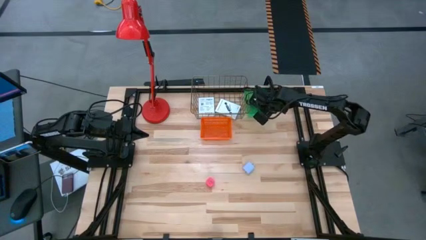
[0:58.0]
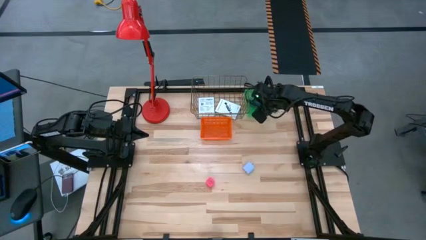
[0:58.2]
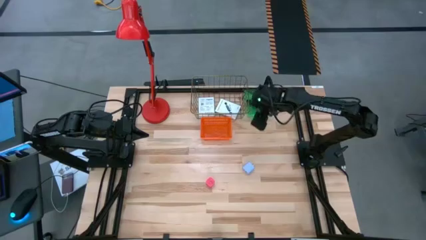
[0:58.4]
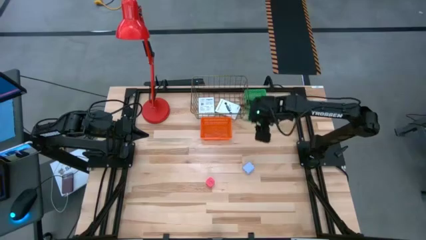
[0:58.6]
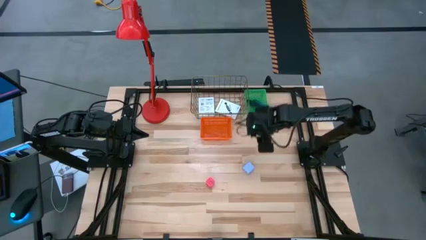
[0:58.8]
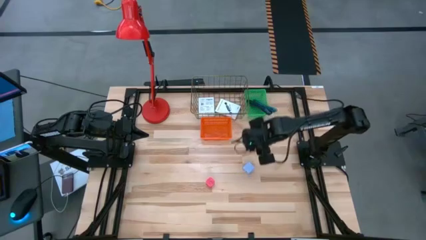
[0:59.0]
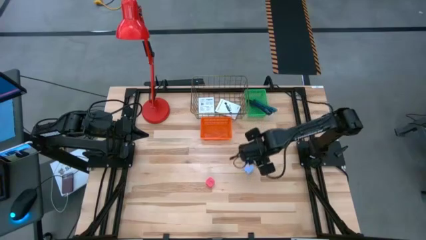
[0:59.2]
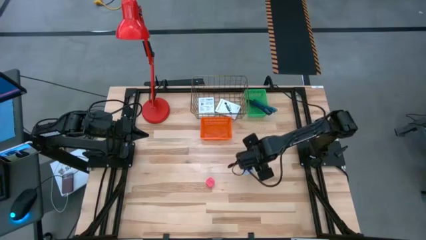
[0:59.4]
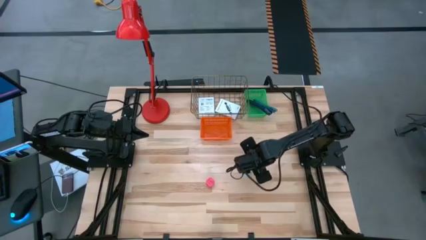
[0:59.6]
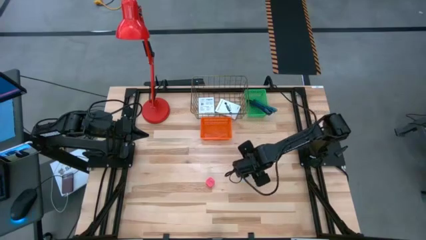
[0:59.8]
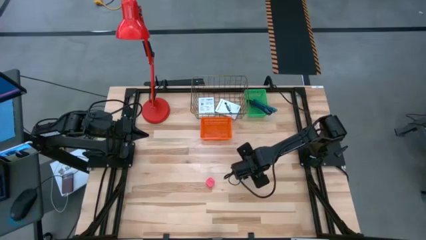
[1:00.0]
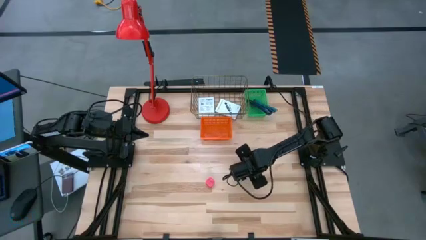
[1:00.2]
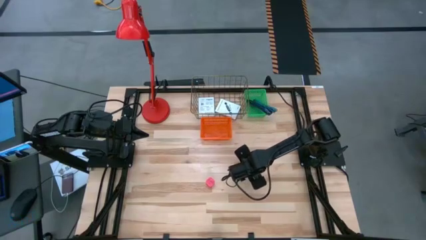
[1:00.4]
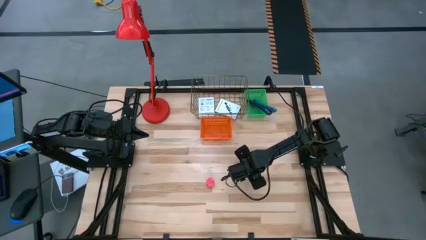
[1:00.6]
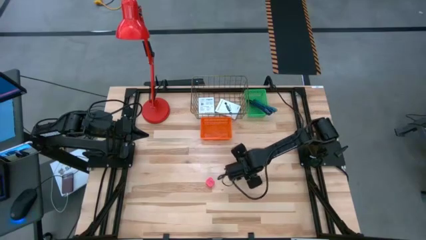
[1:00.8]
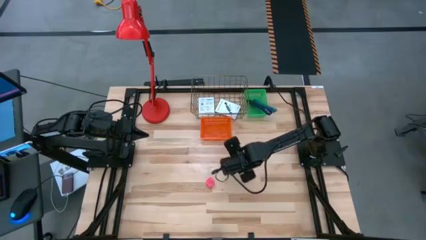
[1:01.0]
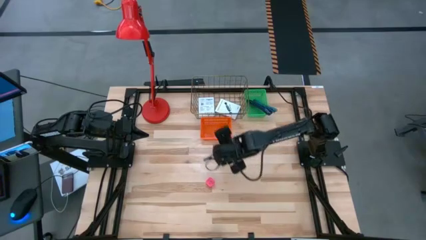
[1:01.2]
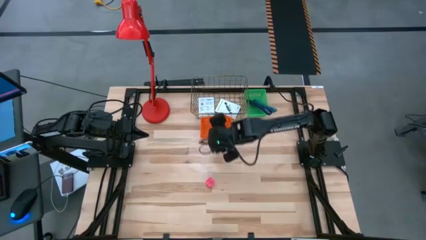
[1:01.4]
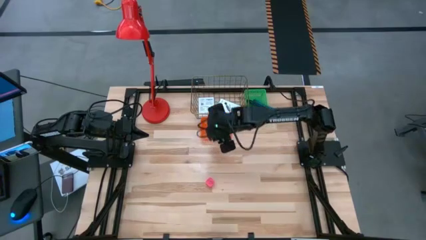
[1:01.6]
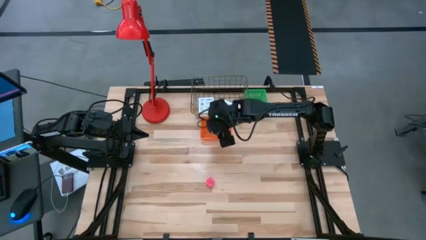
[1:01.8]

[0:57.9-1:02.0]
Task: Pick and place items into bin
Put the blue charger adapter into the orange bin

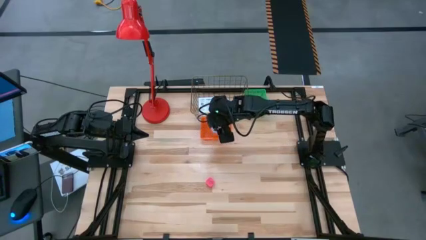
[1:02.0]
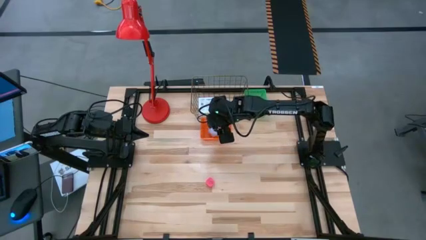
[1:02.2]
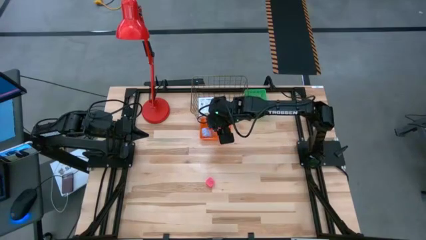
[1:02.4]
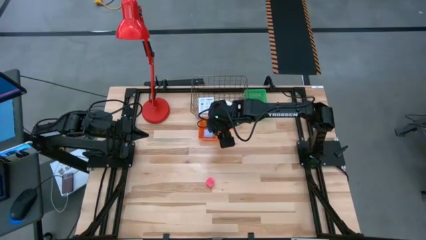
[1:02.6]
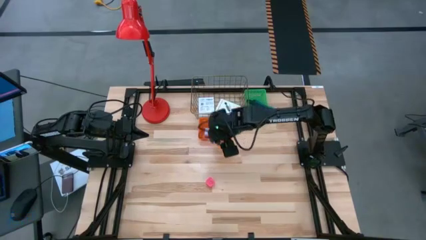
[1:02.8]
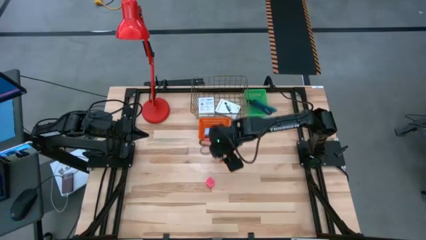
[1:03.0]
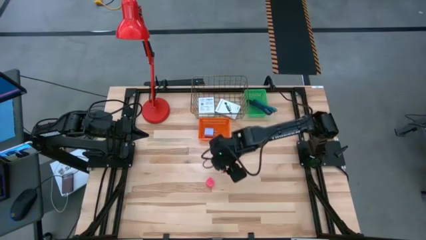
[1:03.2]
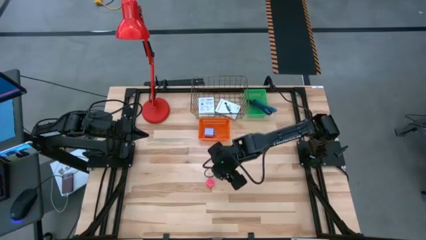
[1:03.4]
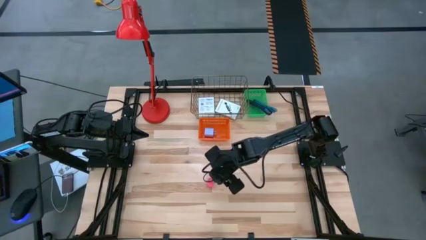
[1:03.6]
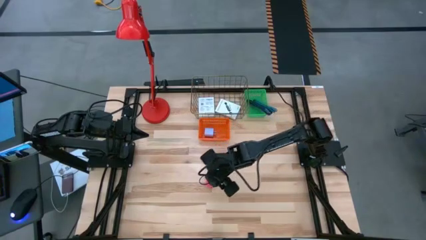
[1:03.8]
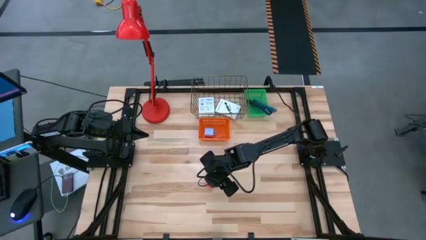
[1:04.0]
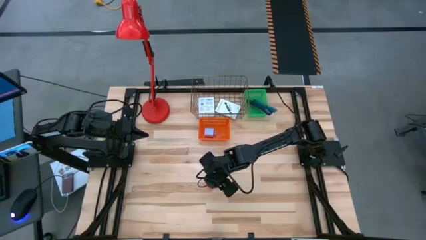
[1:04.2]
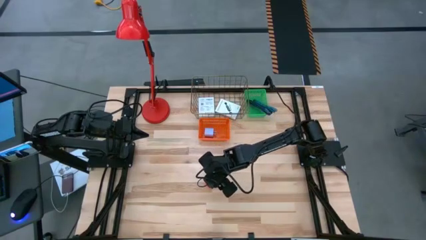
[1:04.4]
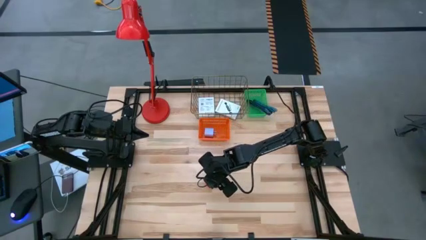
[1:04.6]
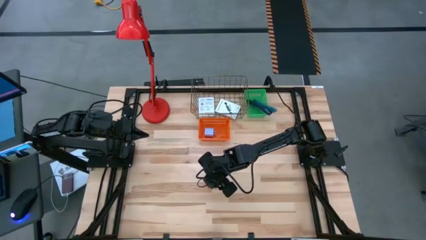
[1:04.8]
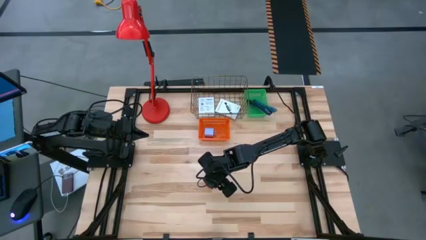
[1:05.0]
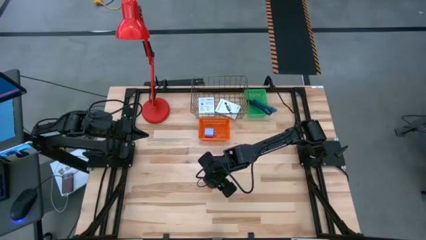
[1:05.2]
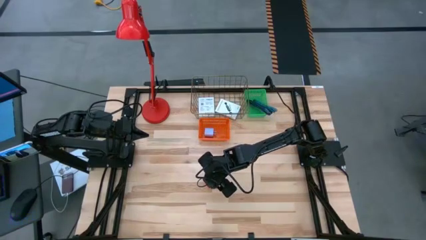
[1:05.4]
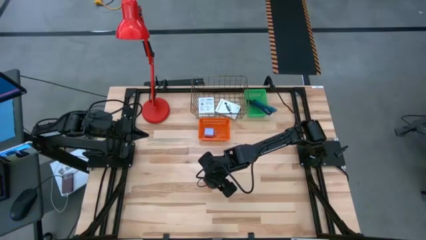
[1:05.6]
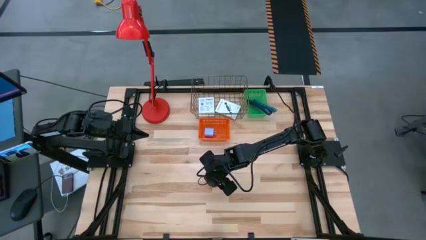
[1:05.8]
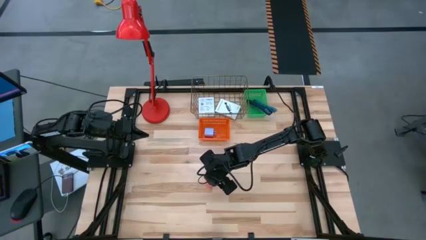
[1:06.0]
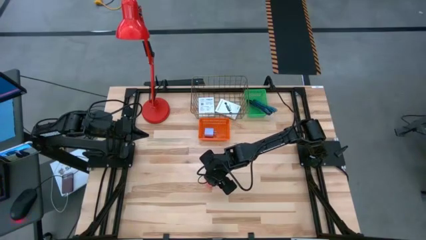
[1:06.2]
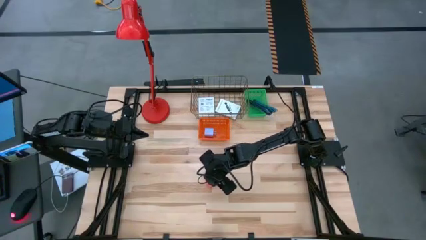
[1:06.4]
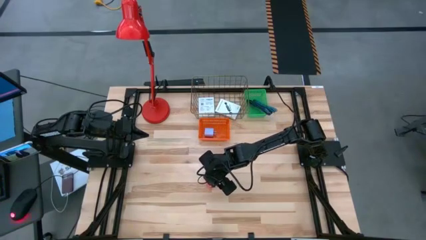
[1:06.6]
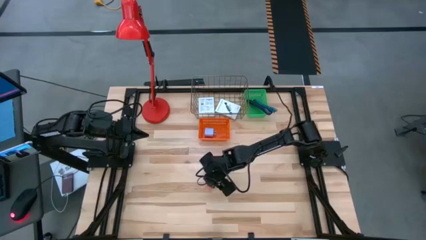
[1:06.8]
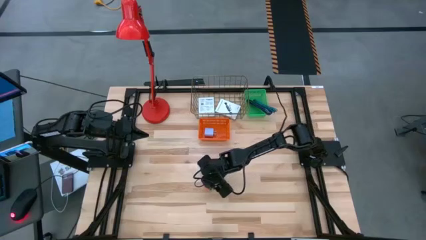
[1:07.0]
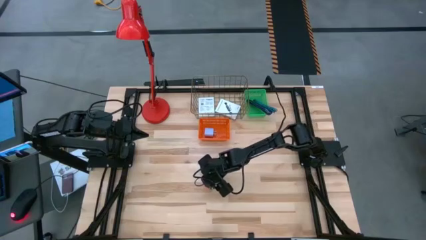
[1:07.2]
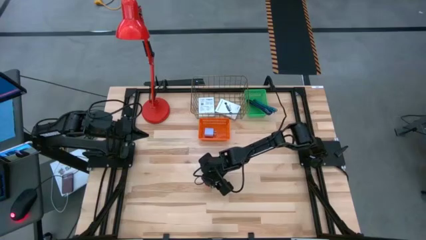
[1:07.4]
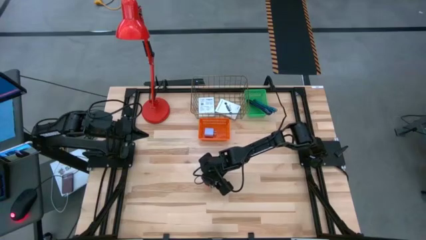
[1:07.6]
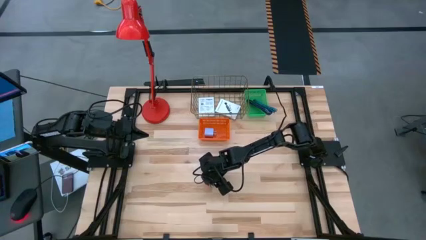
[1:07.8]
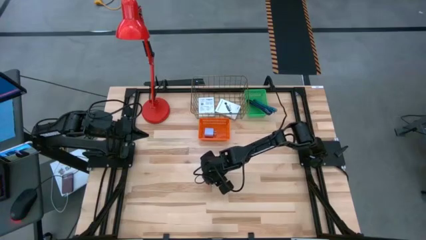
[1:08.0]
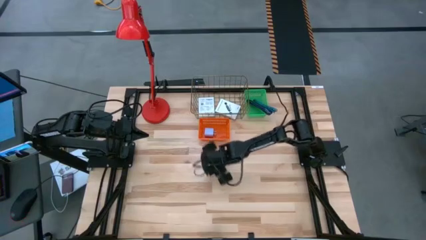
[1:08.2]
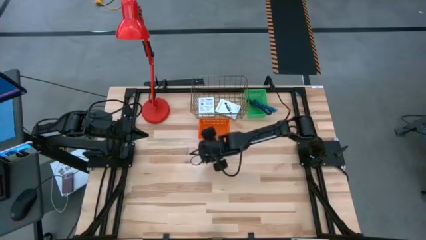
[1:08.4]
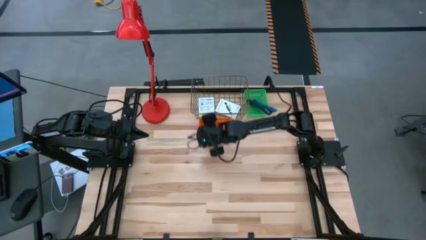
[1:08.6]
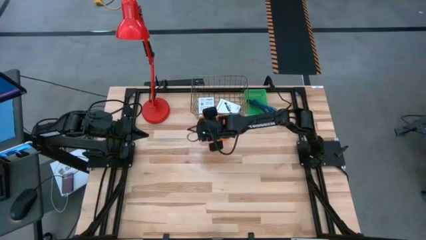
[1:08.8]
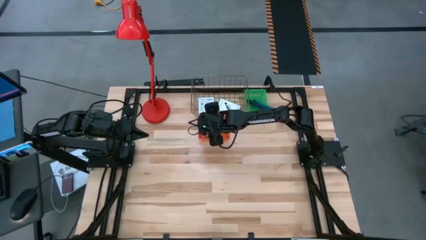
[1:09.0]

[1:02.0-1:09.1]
Put the pink charger adapter into the orange bin
